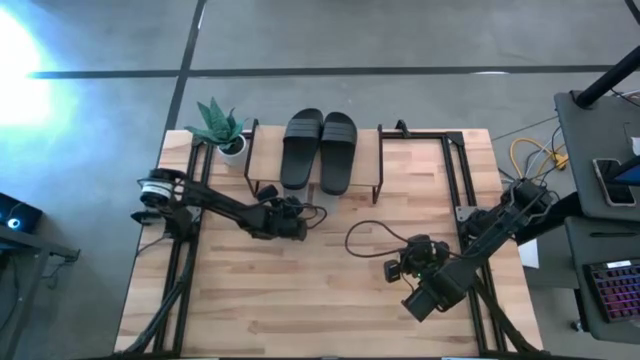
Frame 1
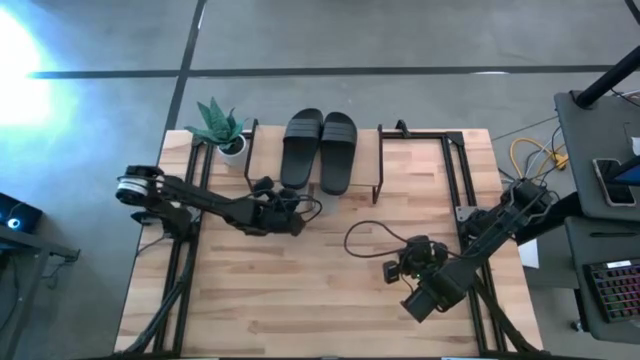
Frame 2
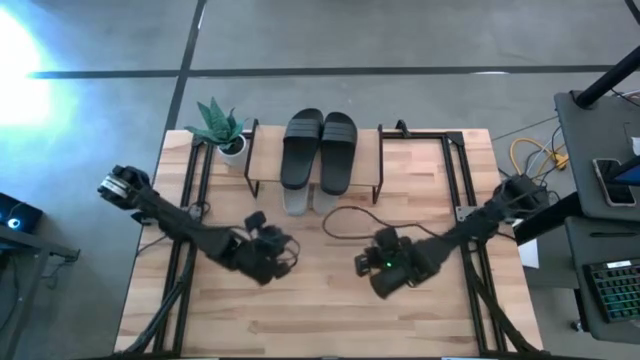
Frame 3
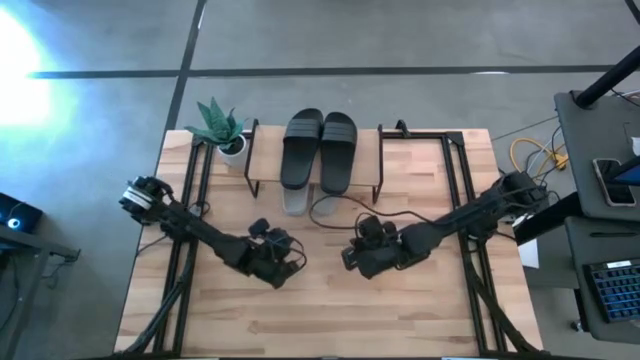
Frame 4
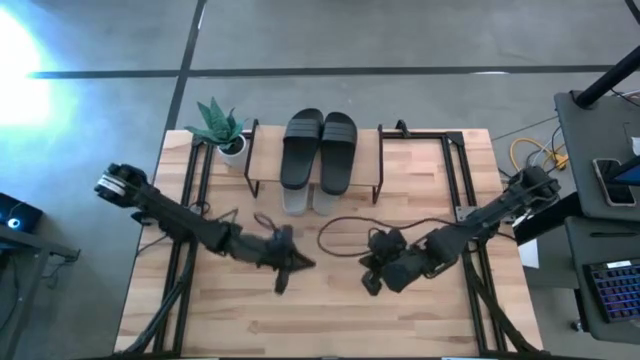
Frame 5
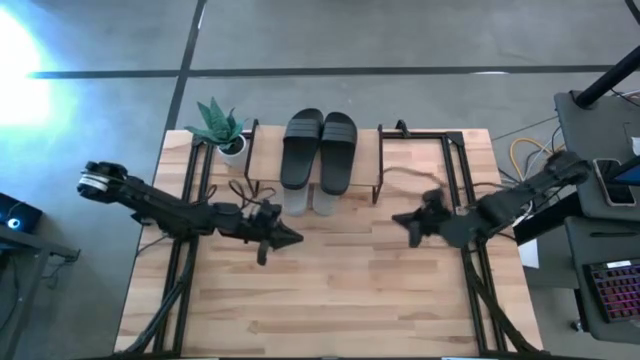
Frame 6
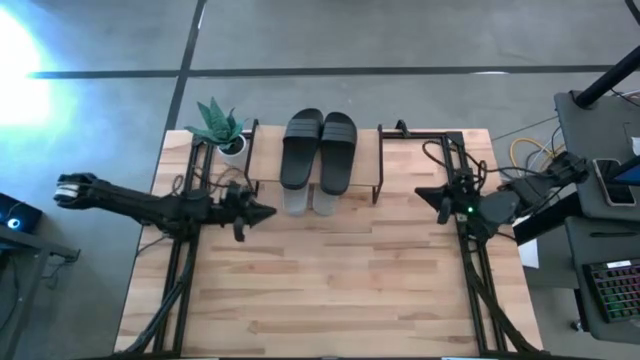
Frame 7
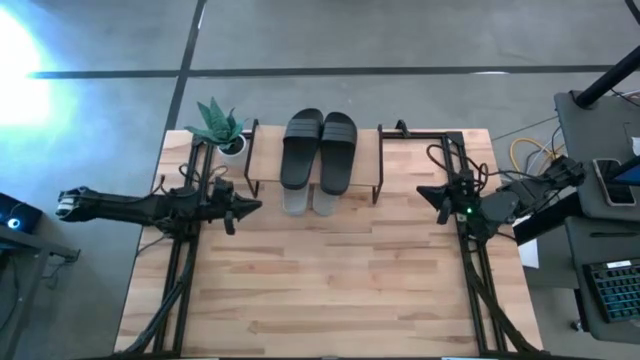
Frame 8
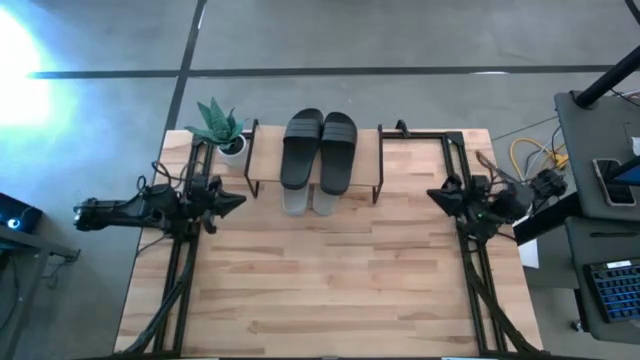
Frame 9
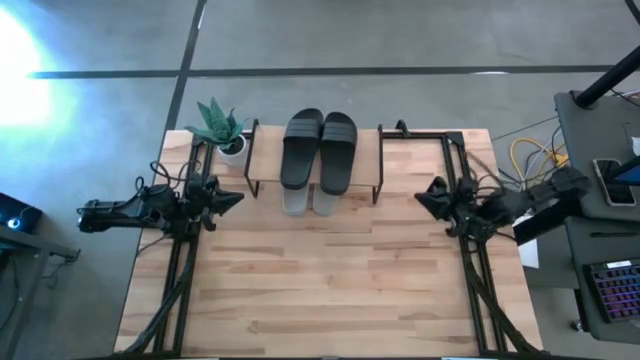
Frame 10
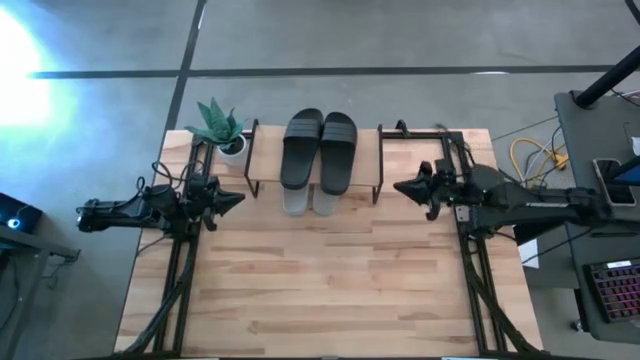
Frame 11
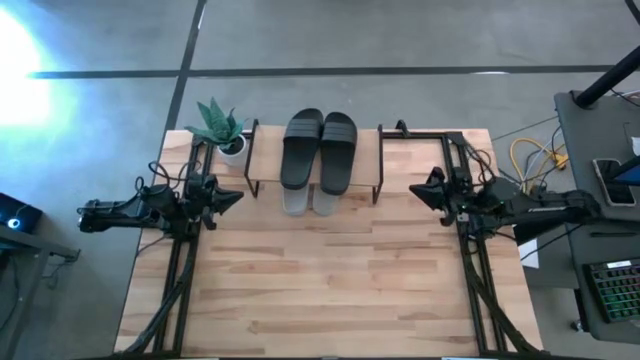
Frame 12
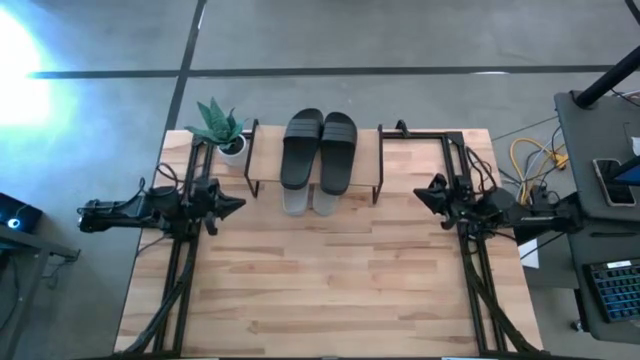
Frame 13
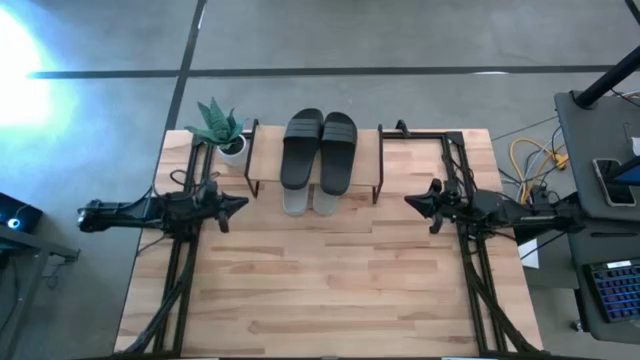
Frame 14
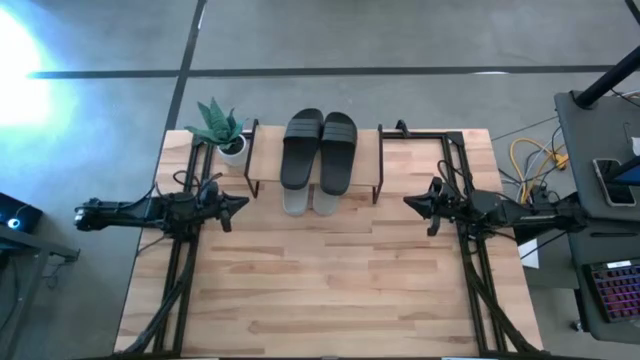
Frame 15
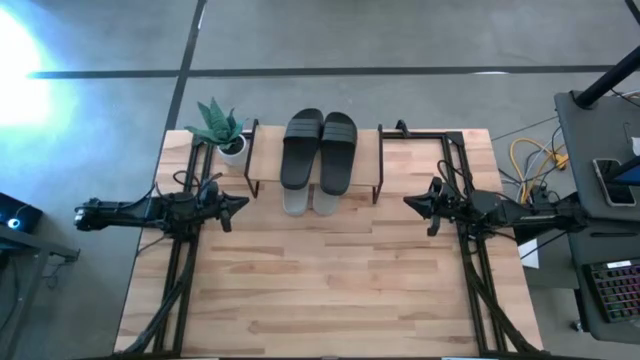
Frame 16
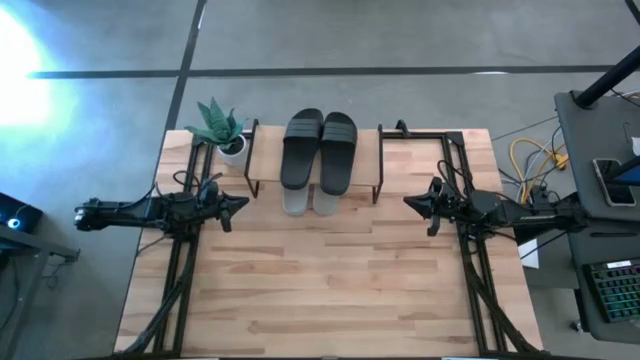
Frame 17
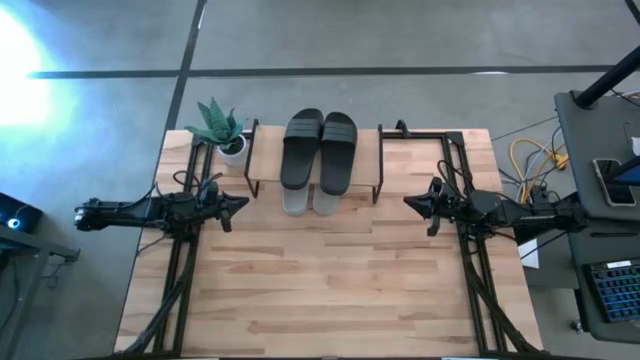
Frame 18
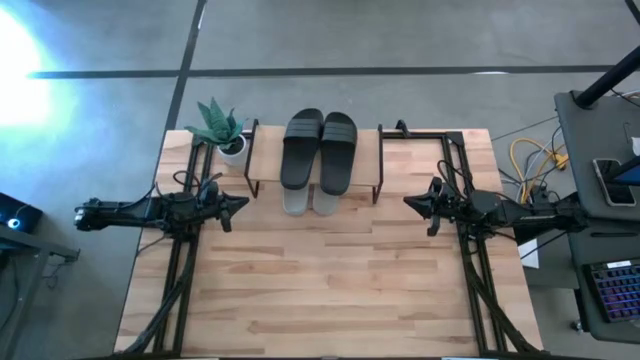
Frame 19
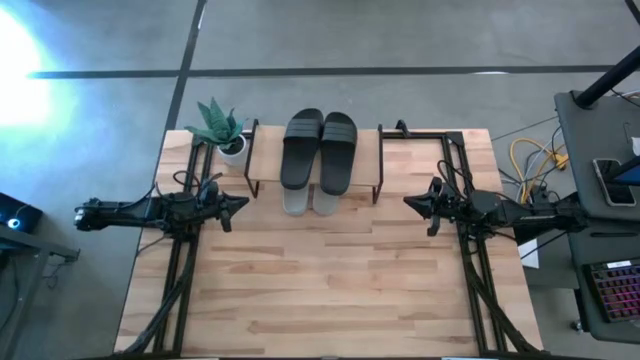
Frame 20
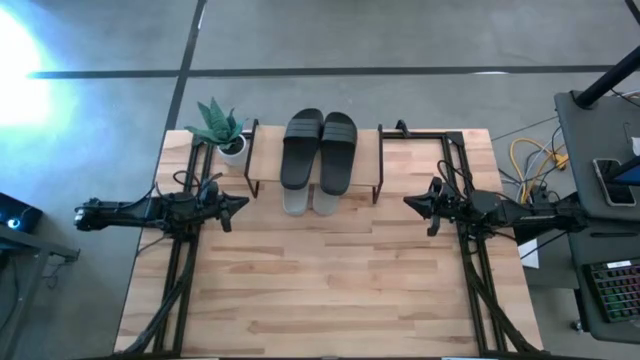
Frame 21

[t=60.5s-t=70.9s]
Task: Pick and place slides into the shelf
Return to Home Position

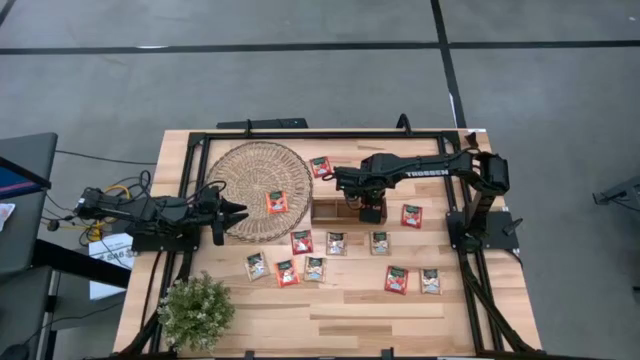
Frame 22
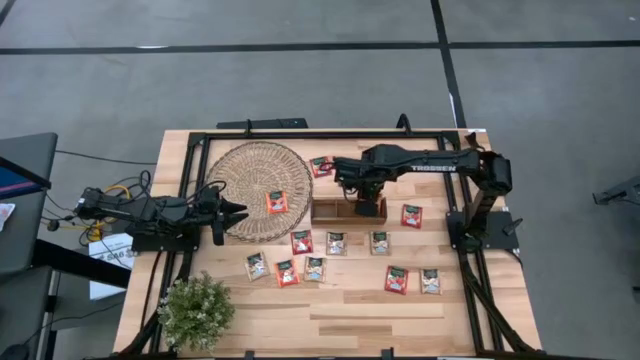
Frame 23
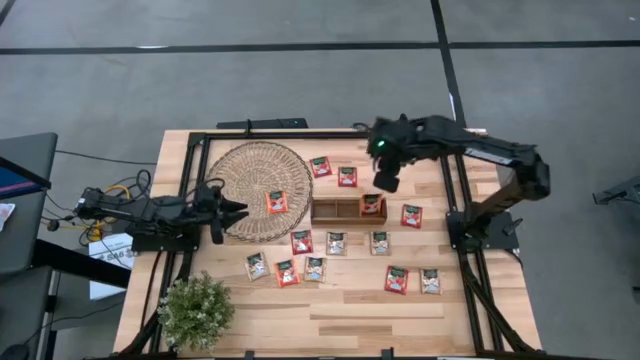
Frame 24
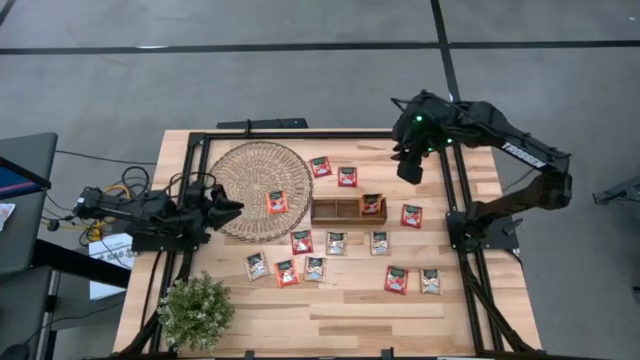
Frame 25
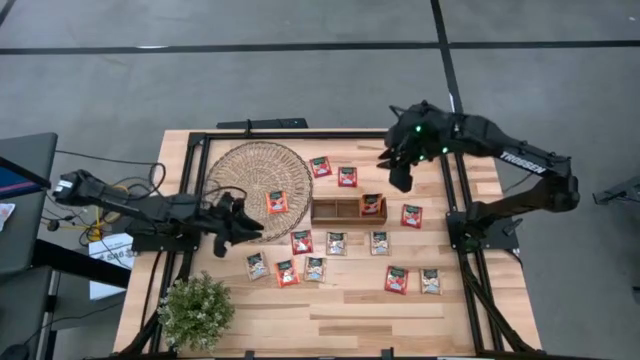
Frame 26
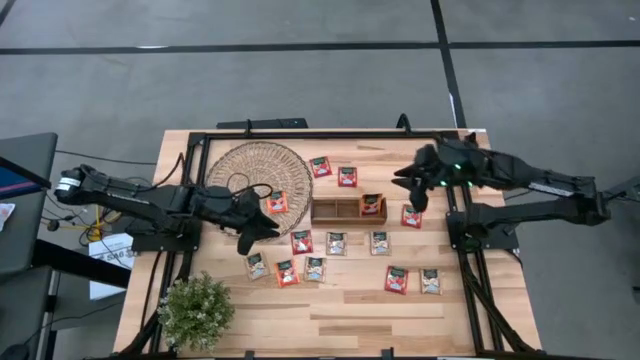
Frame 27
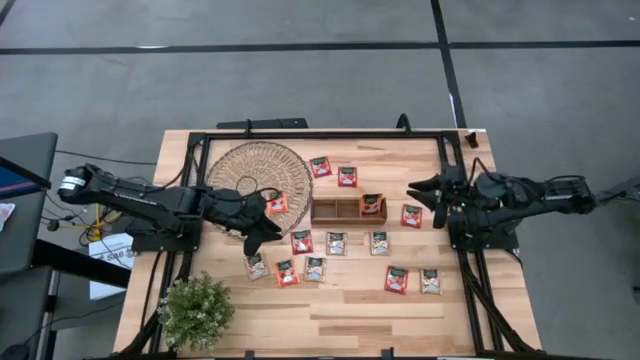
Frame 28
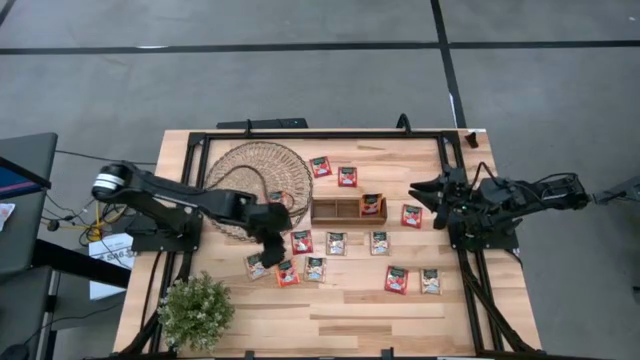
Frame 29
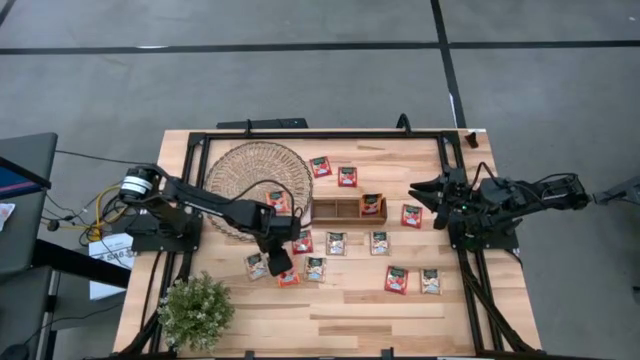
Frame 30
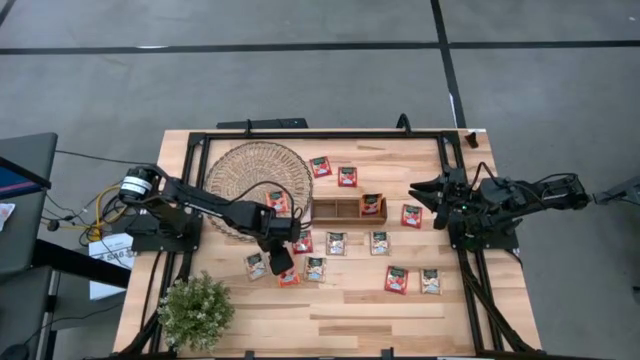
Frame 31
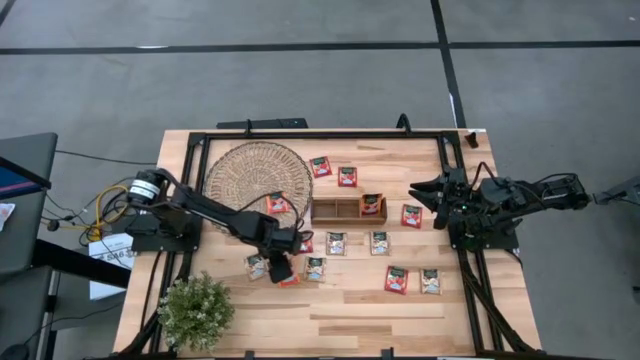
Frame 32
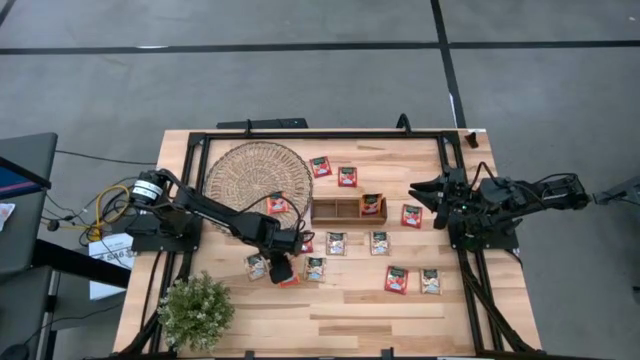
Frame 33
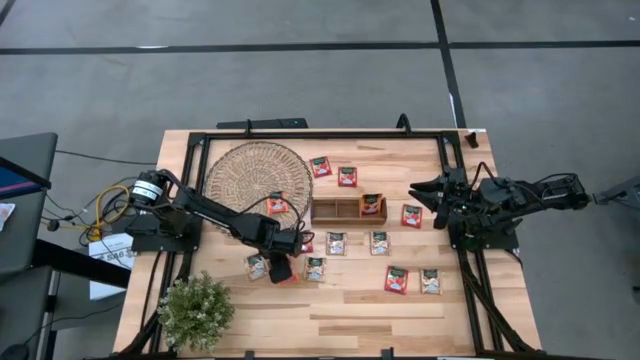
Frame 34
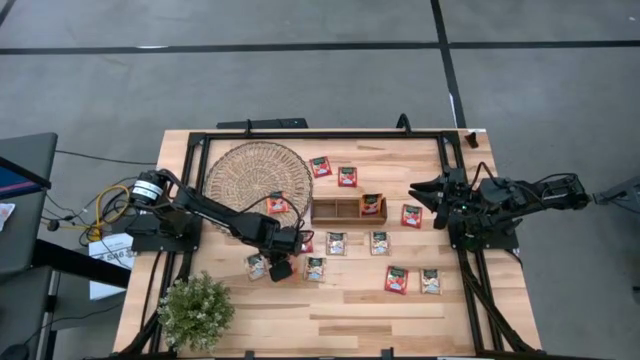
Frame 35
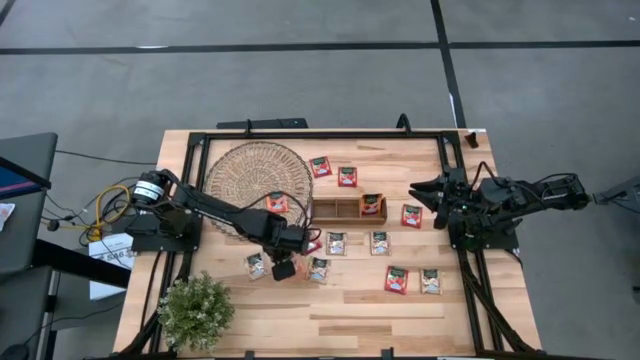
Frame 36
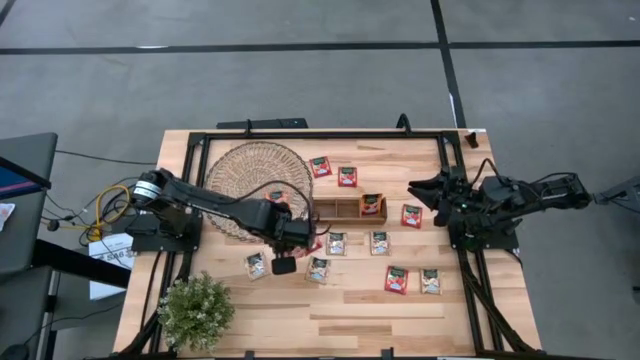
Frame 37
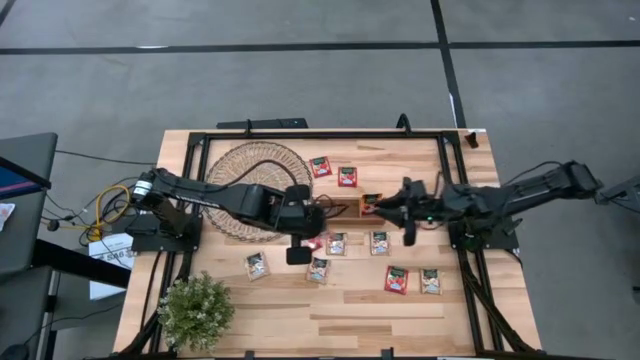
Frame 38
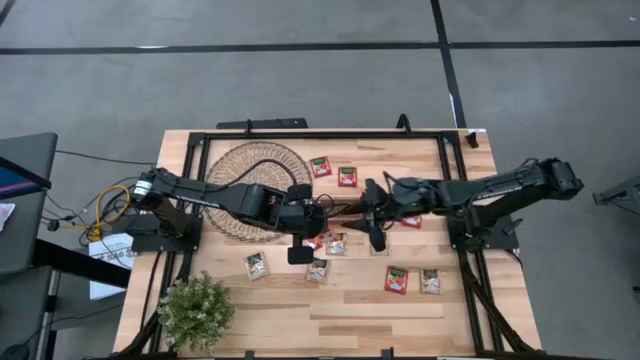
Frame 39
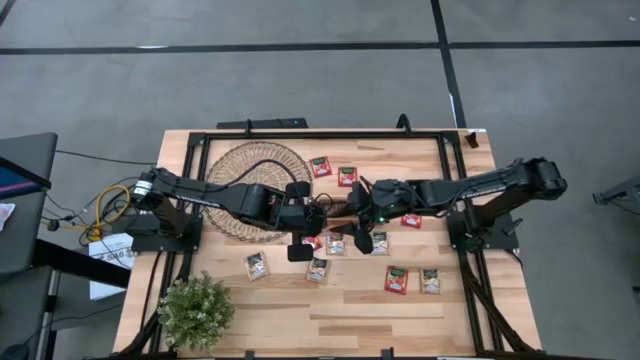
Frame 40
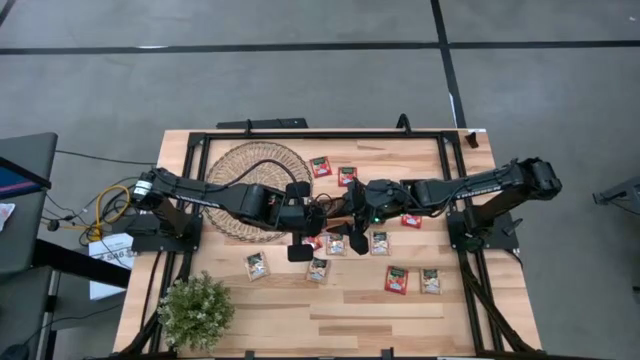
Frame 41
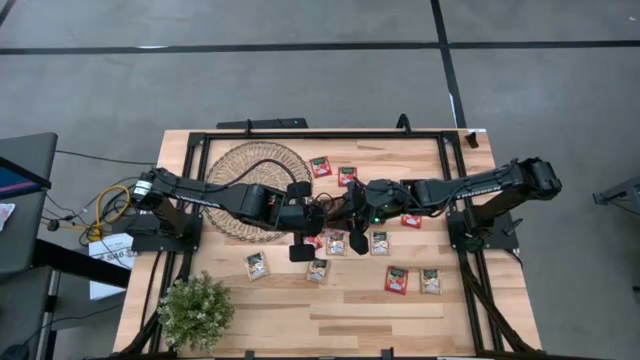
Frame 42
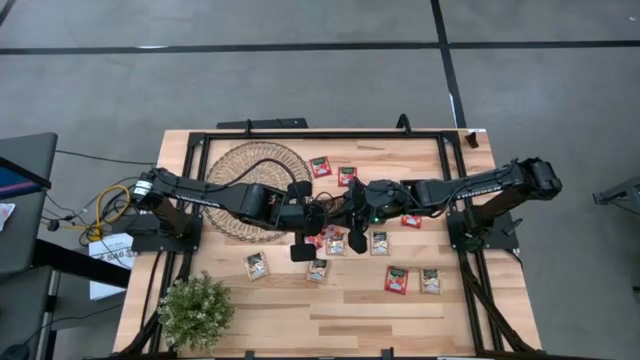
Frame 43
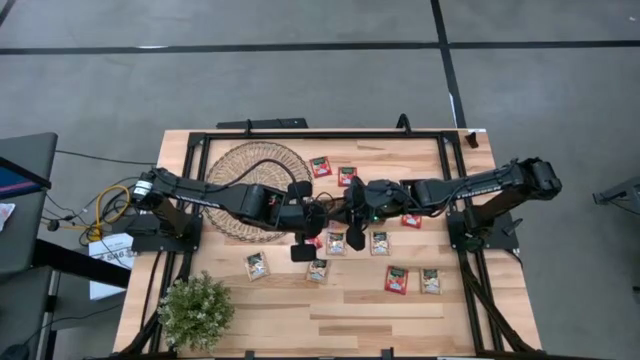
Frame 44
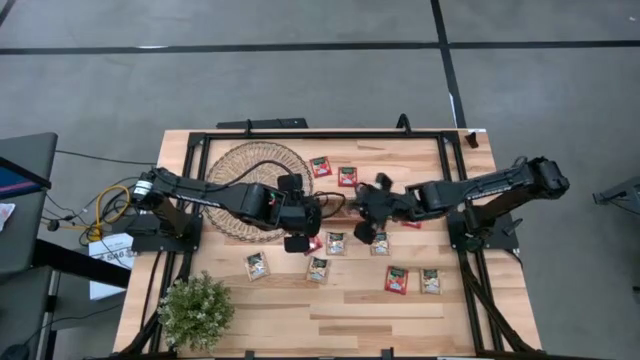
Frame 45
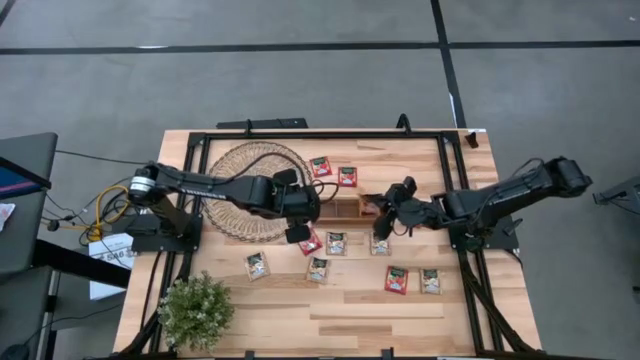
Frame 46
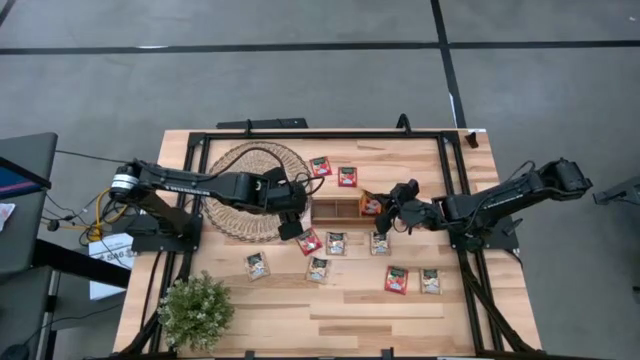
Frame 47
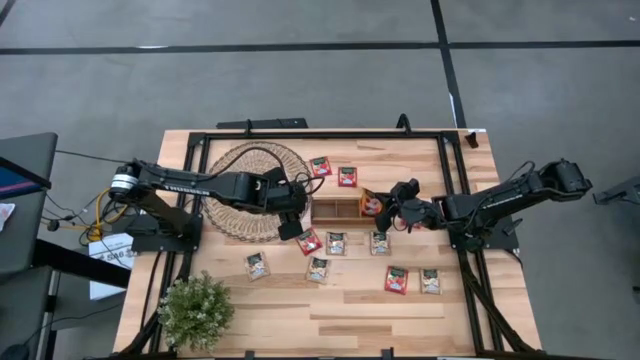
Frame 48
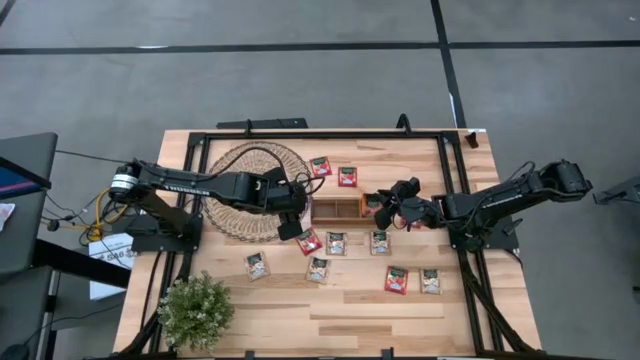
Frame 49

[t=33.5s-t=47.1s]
Task: Pick & Place Tea
Put the orange tea bag into the right section of the wooden organizer
